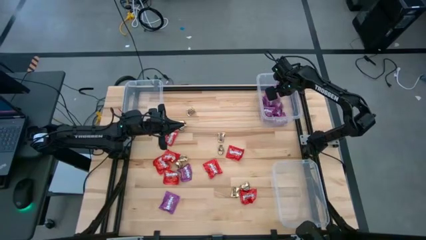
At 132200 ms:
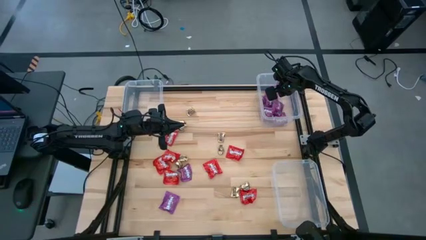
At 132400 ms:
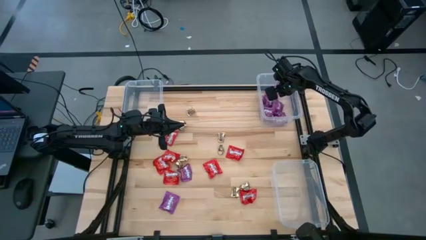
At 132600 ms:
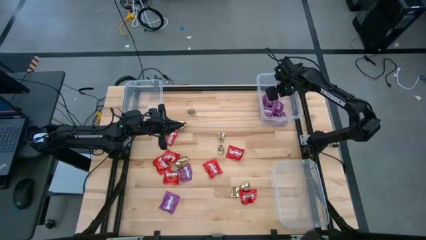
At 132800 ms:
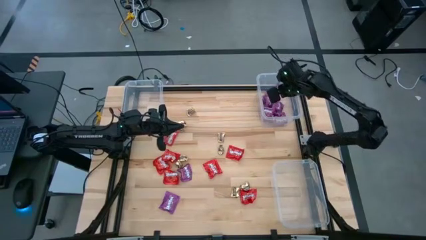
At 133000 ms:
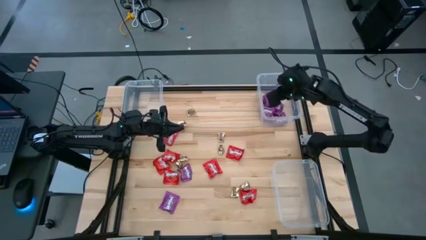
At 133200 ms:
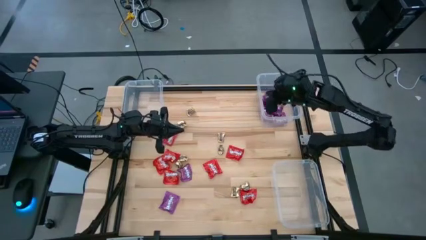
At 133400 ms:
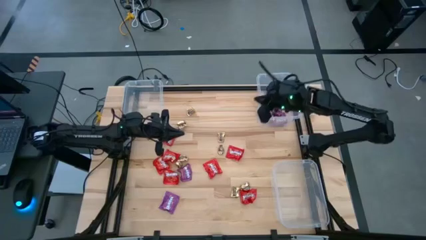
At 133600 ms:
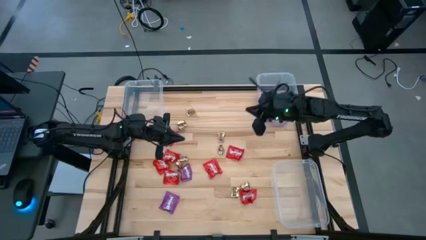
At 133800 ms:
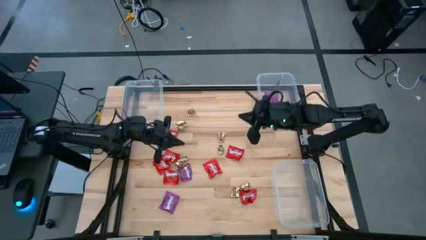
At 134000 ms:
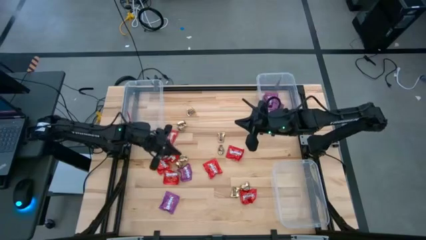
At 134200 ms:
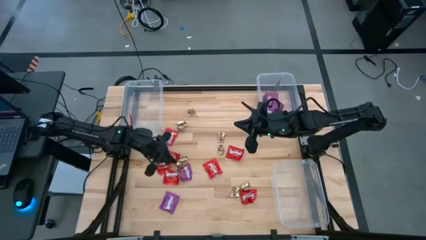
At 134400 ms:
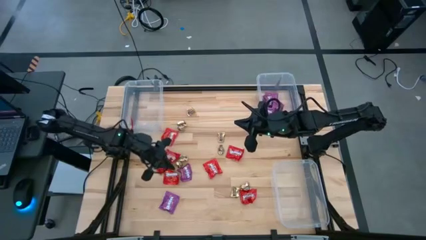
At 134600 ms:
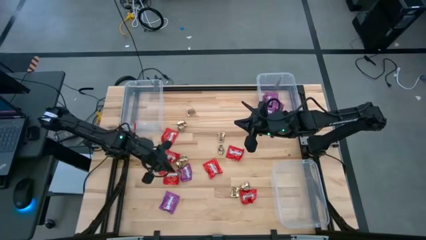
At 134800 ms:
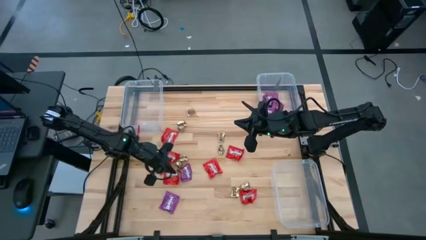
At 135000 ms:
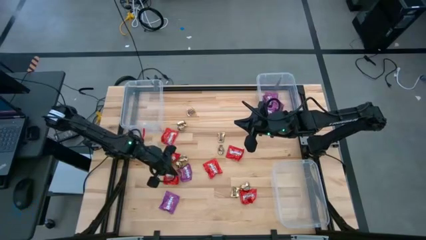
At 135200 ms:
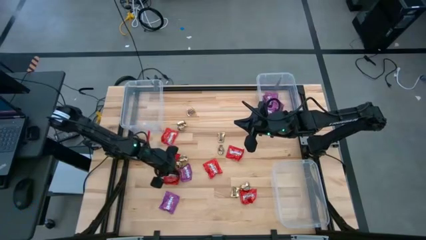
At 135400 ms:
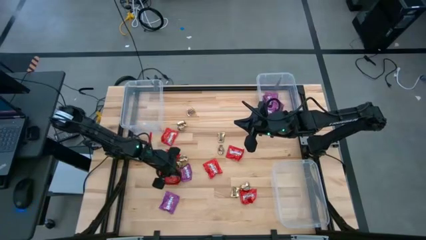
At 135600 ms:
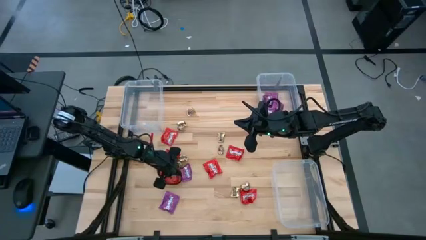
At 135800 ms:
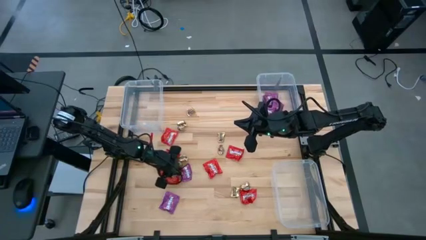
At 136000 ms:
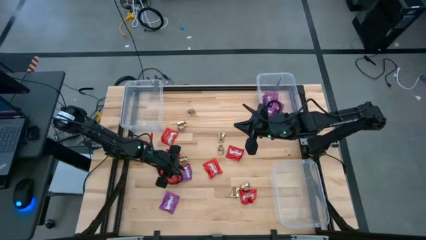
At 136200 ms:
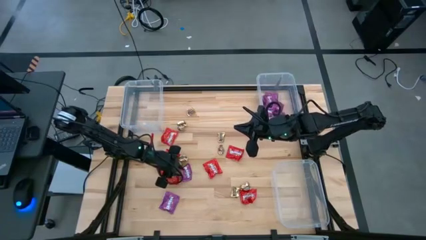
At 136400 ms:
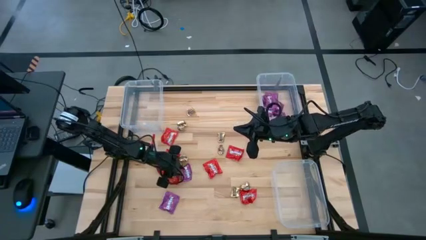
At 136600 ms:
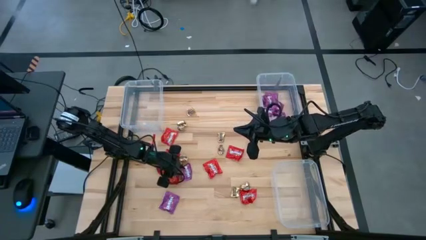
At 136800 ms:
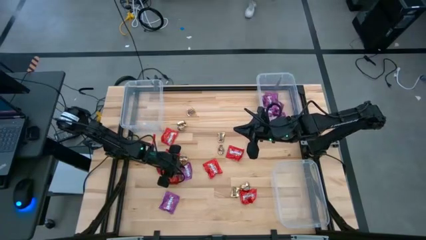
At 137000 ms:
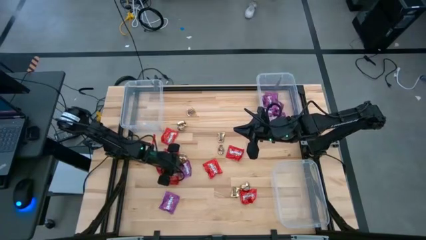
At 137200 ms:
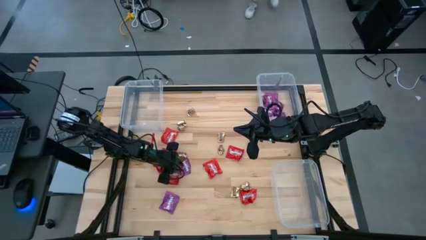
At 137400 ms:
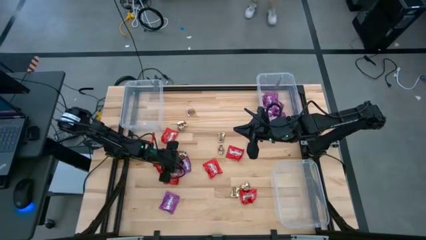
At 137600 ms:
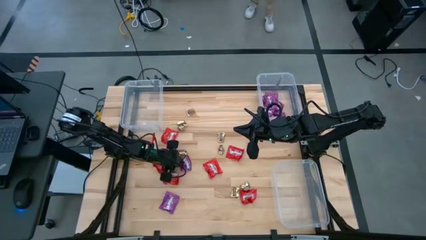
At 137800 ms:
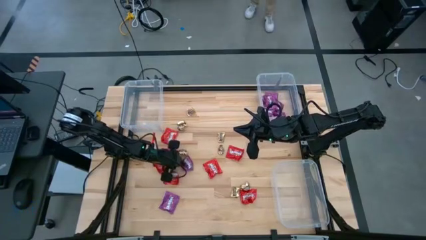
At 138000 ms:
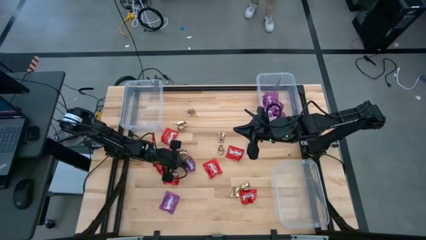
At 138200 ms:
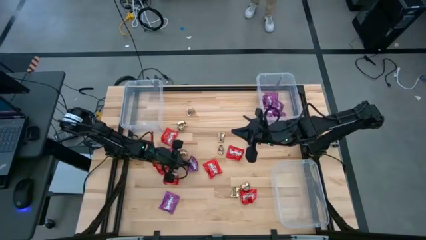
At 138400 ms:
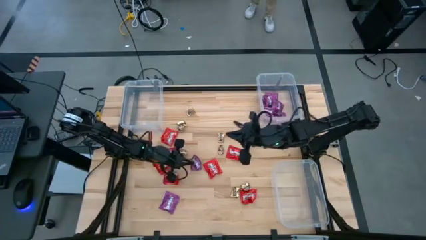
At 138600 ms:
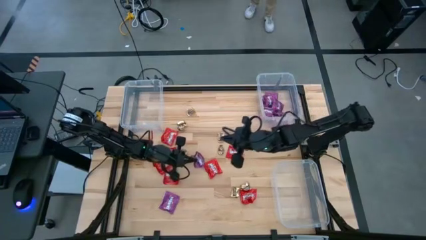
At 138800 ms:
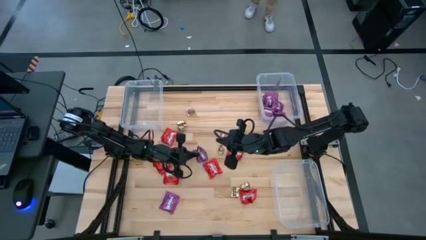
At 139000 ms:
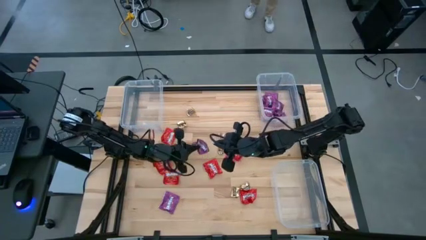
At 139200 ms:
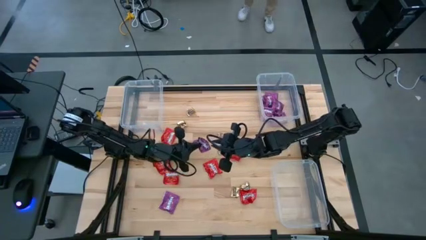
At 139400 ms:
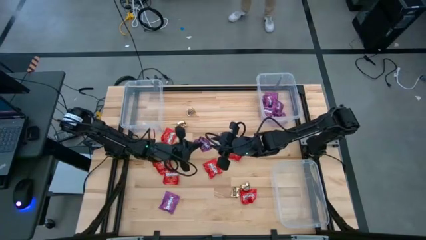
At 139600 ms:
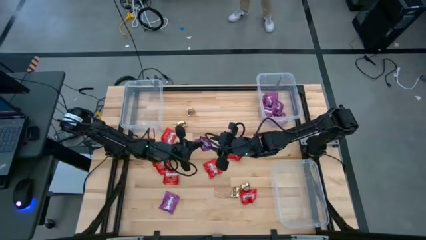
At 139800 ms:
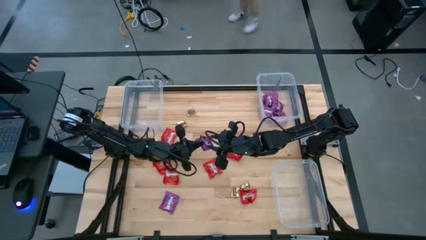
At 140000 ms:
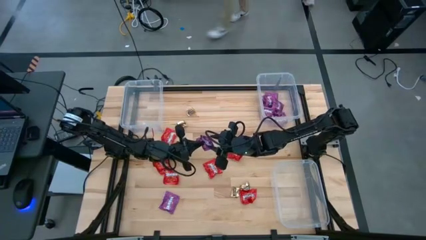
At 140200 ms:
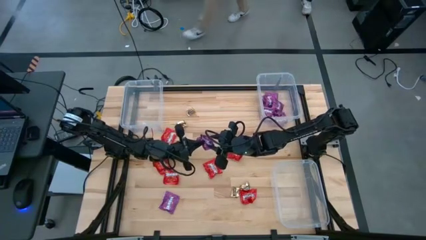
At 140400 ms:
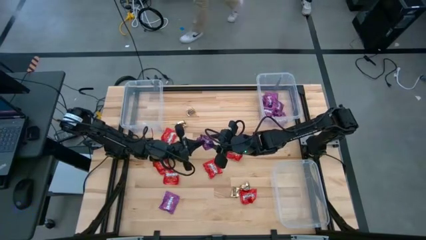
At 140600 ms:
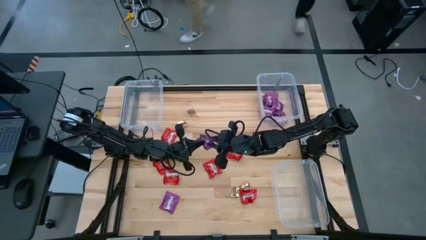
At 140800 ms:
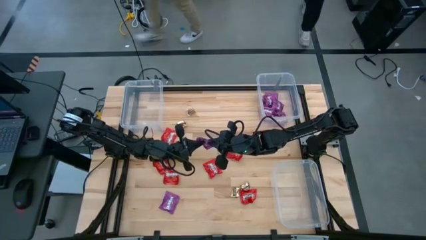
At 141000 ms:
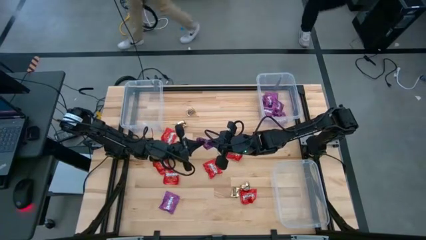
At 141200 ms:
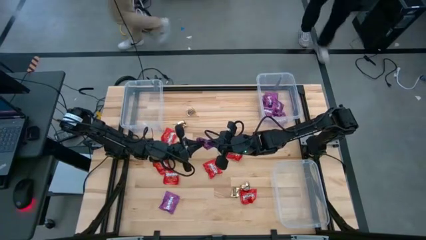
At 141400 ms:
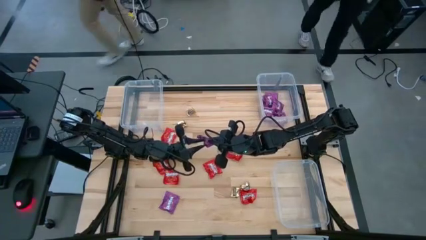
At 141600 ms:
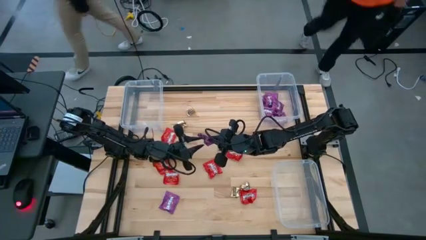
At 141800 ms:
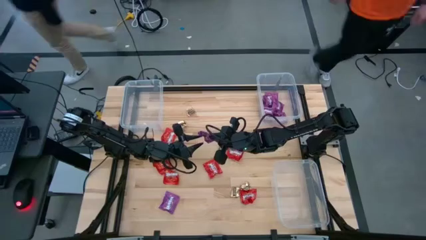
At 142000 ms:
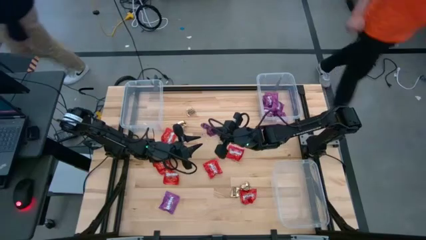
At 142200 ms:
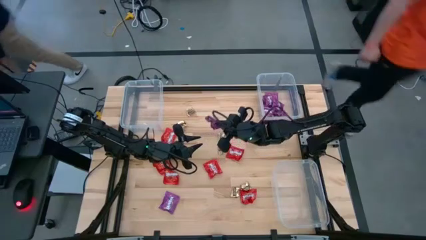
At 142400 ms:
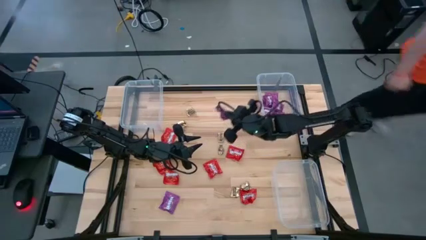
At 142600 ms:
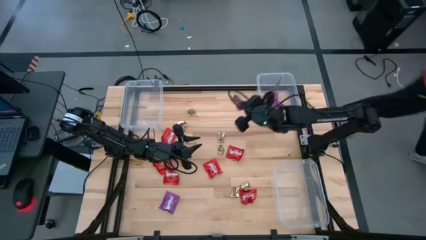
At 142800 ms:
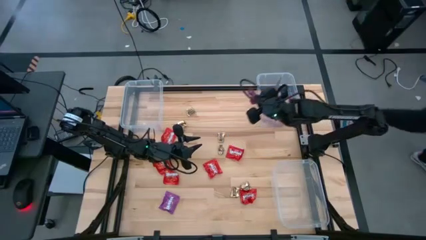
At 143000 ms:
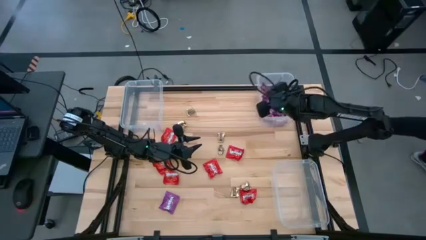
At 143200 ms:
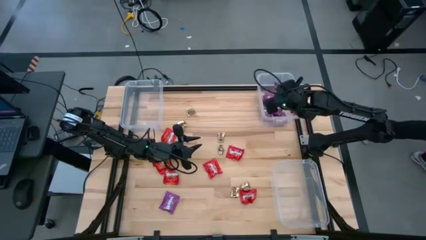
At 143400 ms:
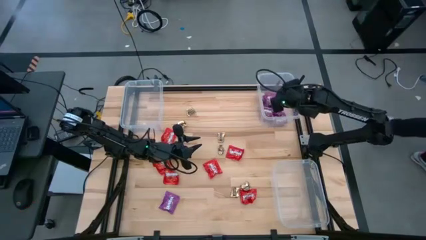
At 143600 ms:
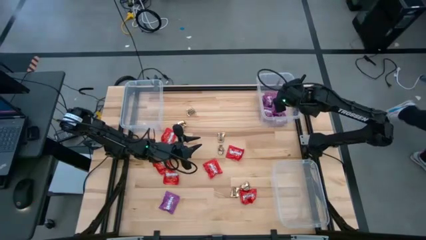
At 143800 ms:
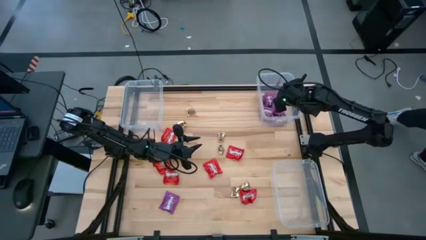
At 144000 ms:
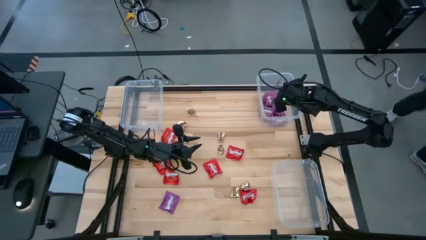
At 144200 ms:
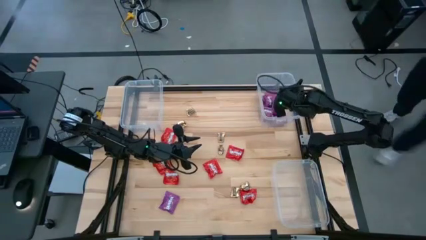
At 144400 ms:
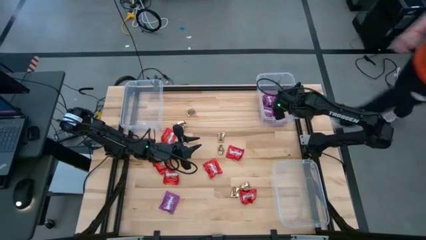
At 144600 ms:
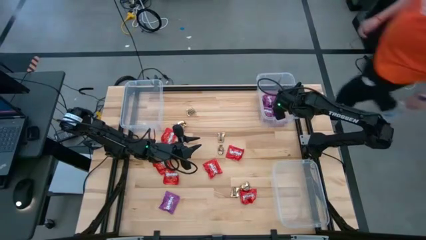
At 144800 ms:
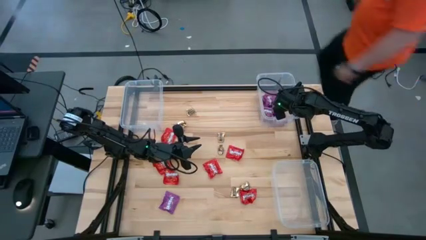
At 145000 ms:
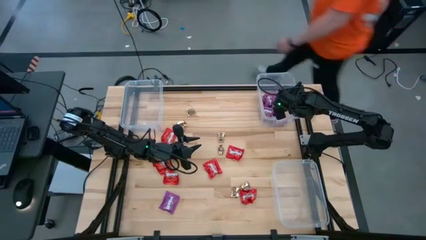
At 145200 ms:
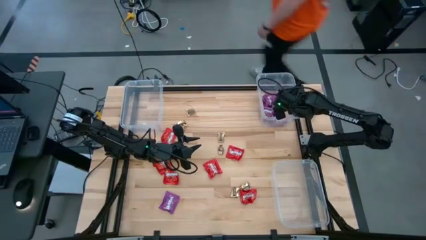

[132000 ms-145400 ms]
Task: Sort candy
Put the purple candy into the top right transparent bin

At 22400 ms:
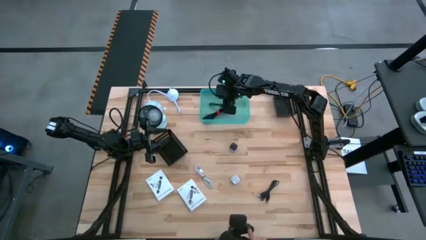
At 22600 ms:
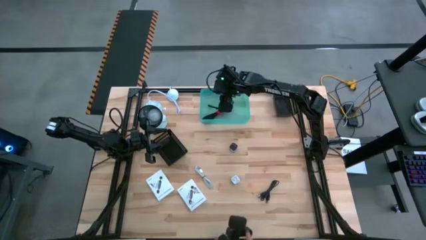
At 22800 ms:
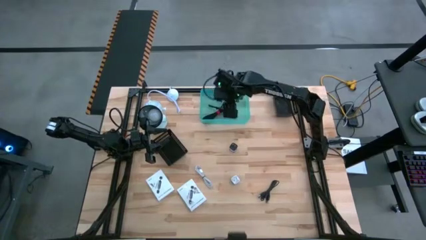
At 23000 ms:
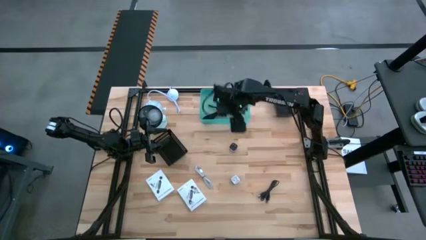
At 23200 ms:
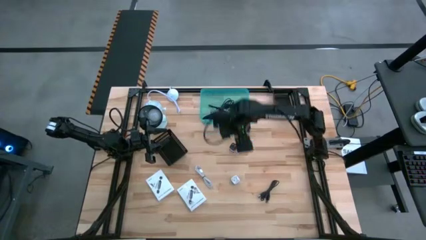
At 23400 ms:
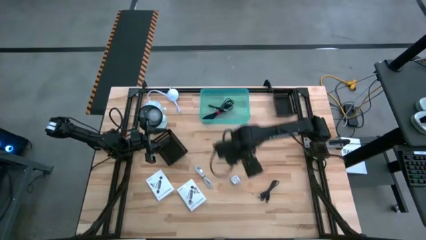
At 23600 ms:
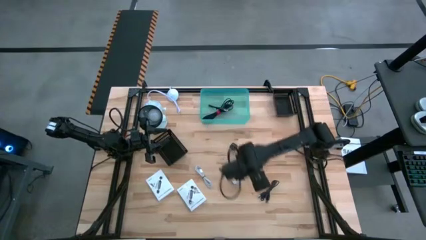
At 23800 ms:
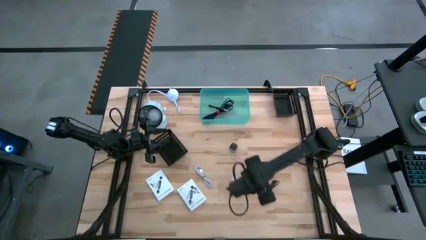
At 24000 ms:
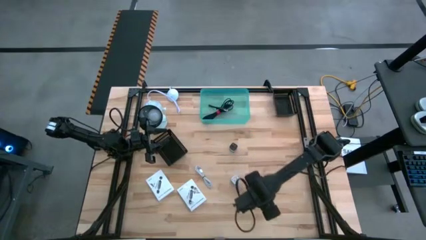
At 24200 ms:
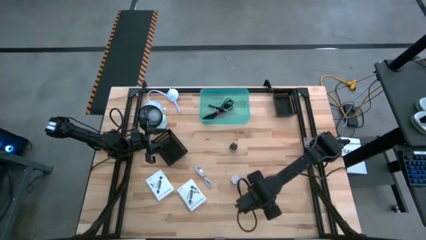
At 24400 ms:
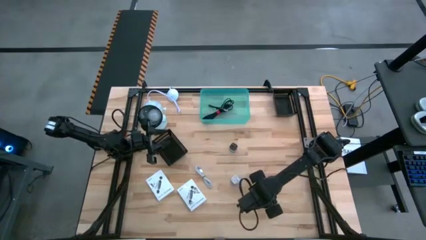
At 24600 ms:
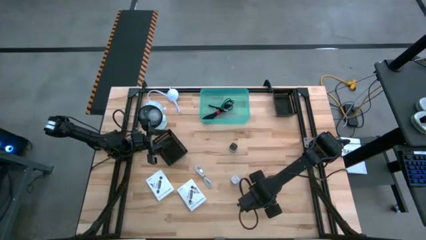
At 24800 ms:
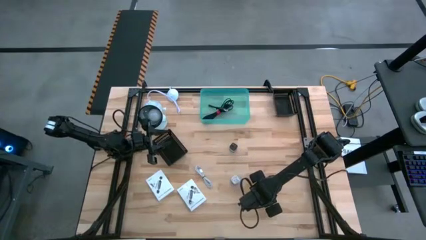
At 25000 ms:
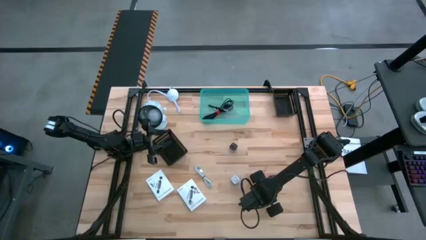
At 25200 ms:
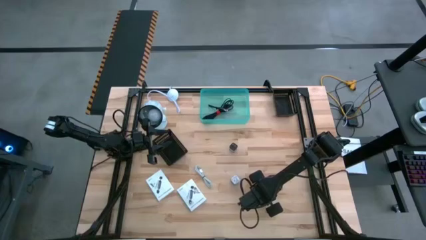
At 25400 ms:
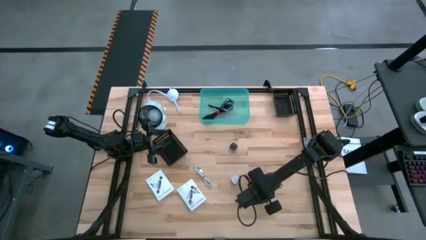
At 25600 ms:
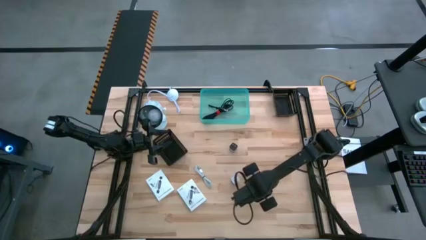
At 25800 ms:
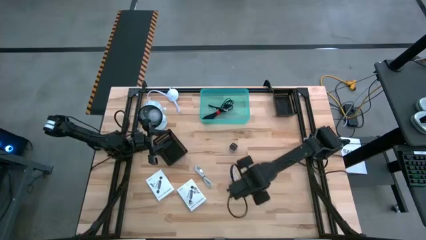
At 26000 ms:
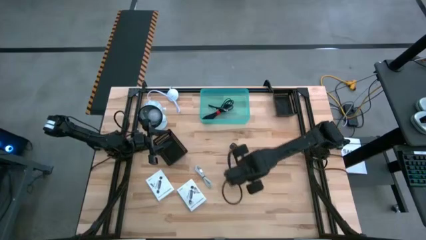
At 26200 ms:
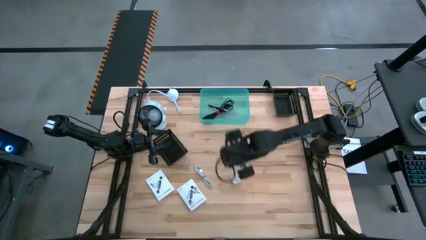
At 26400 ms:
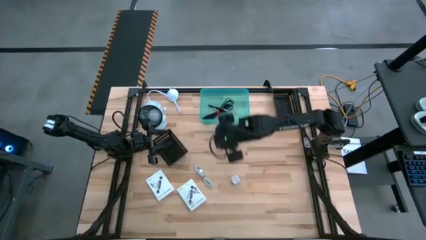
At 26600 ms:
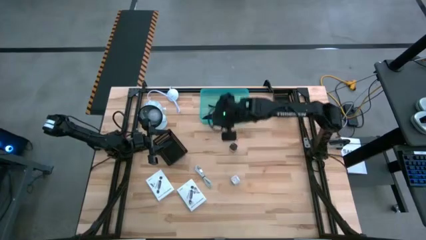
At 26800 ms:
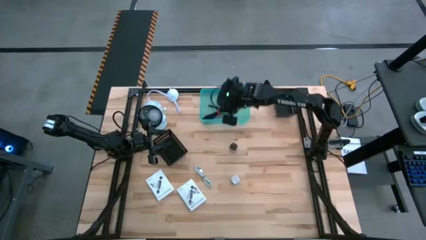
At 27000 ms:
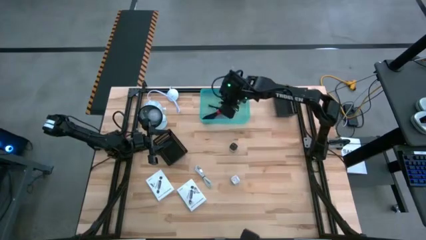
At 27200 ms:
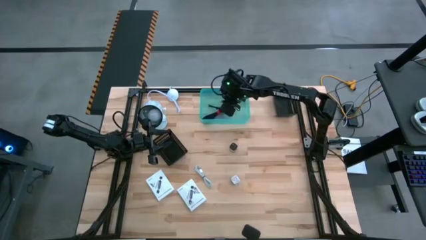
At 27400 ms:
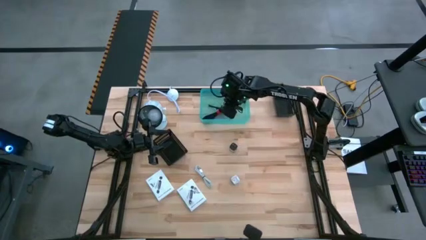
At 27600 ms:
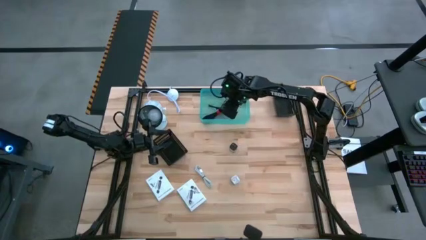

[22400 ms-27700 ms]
Task: Pick and place items into bin
Put the black charger cable into the green bin
